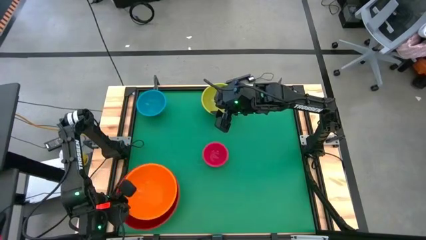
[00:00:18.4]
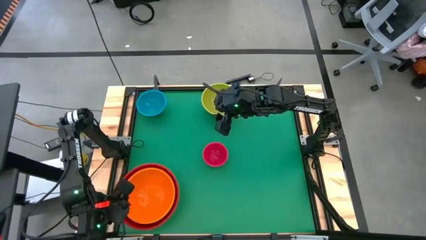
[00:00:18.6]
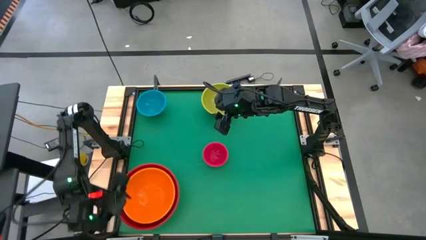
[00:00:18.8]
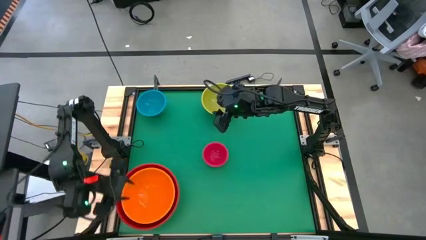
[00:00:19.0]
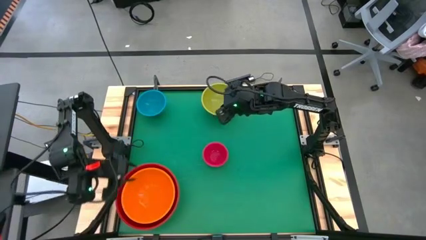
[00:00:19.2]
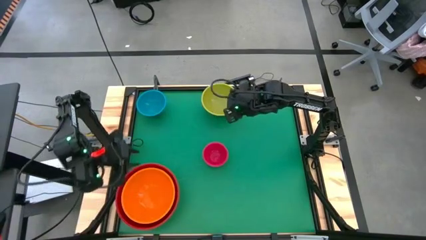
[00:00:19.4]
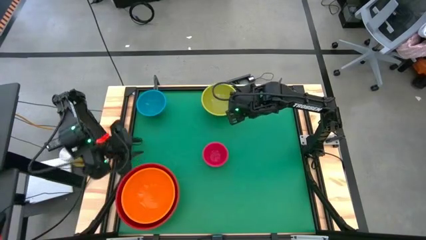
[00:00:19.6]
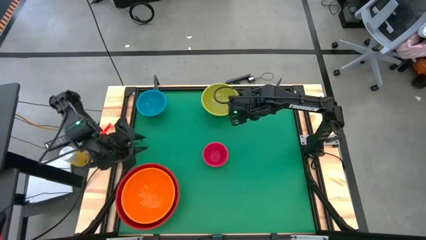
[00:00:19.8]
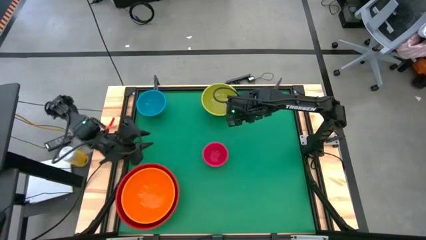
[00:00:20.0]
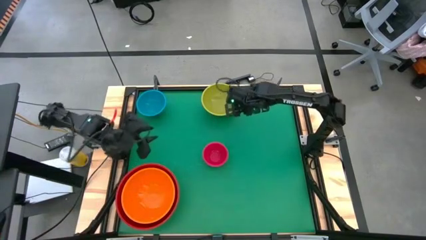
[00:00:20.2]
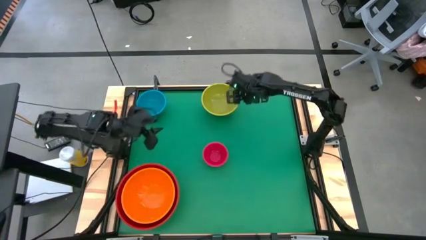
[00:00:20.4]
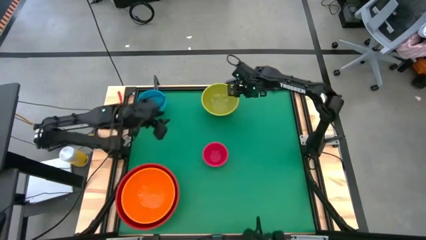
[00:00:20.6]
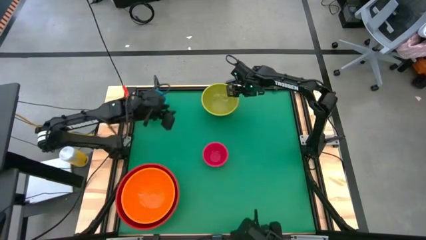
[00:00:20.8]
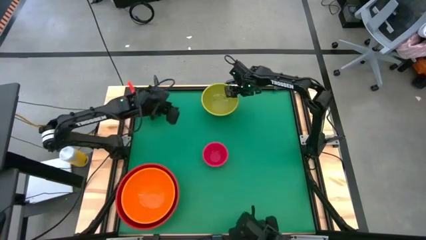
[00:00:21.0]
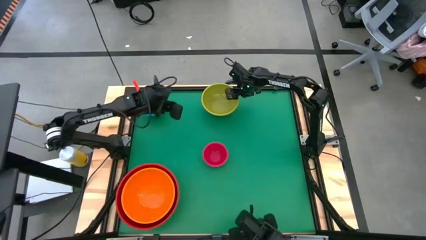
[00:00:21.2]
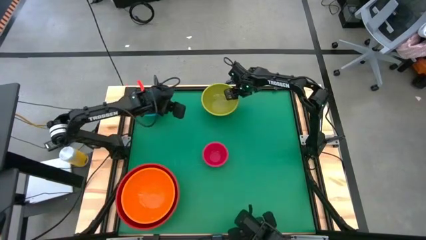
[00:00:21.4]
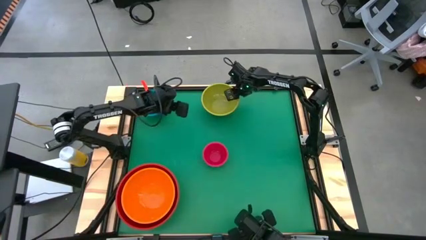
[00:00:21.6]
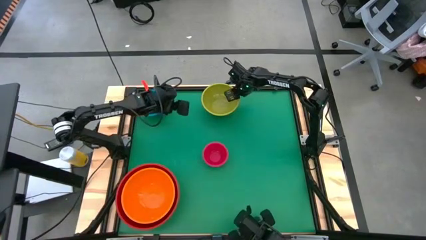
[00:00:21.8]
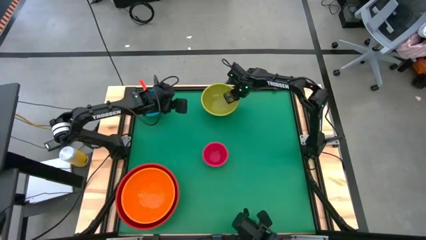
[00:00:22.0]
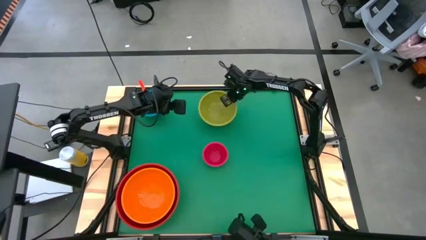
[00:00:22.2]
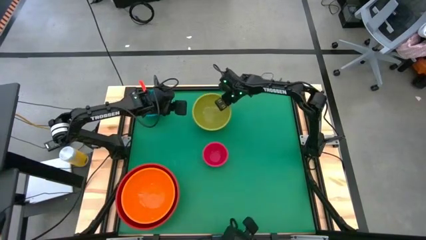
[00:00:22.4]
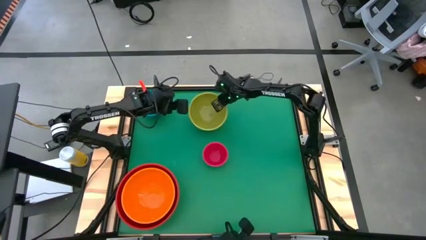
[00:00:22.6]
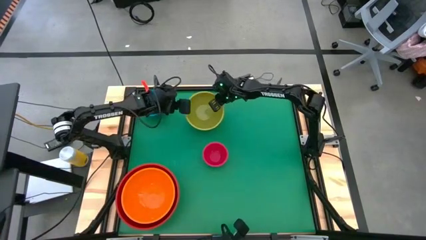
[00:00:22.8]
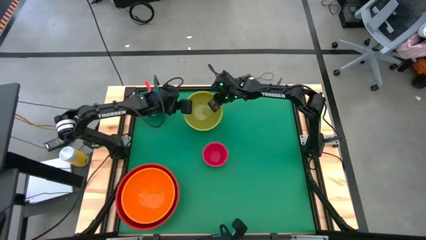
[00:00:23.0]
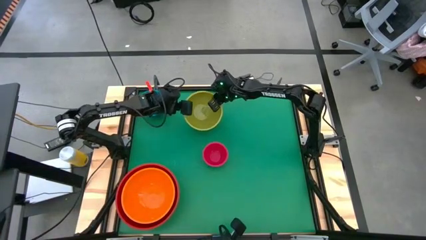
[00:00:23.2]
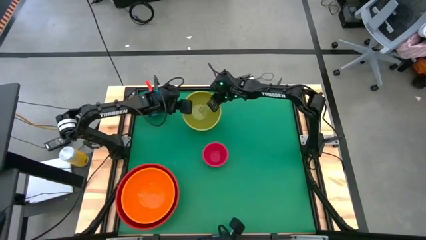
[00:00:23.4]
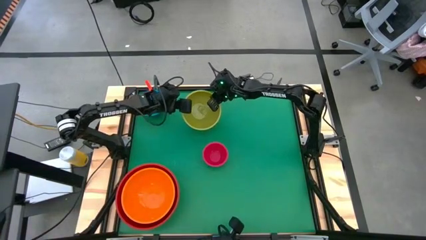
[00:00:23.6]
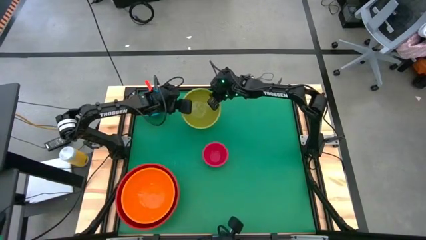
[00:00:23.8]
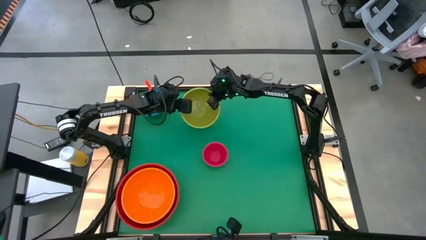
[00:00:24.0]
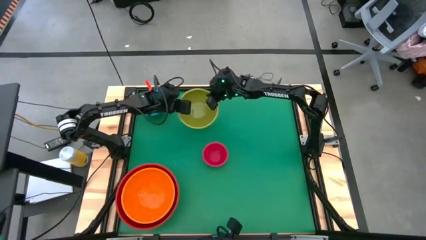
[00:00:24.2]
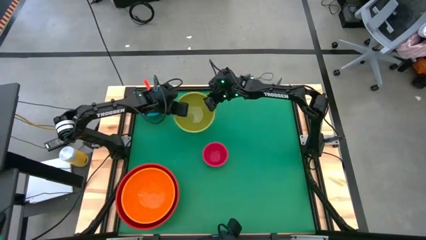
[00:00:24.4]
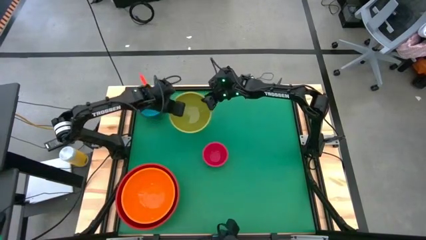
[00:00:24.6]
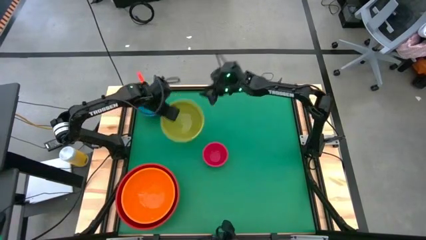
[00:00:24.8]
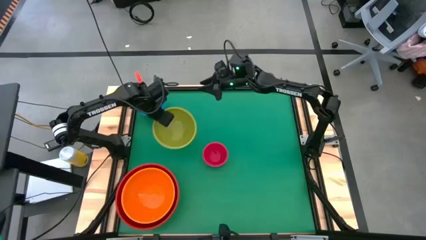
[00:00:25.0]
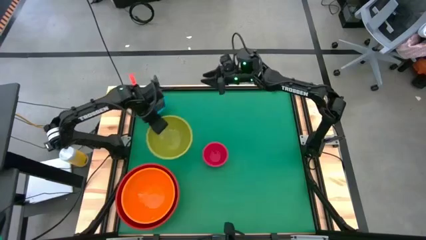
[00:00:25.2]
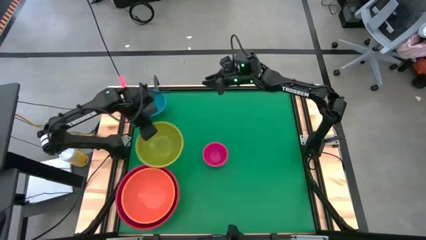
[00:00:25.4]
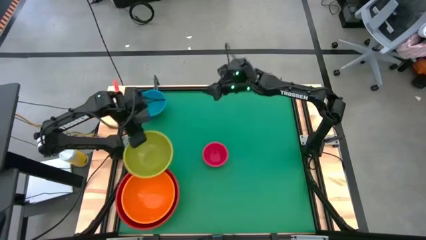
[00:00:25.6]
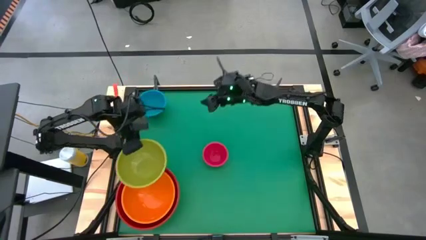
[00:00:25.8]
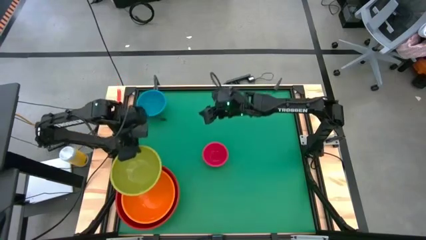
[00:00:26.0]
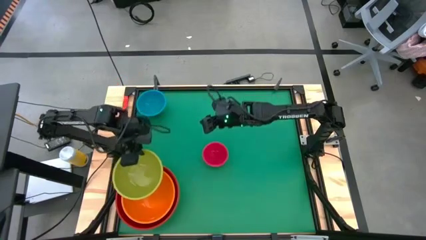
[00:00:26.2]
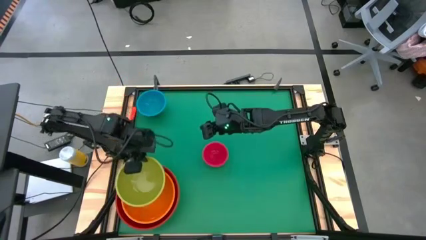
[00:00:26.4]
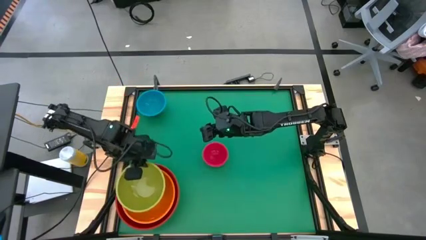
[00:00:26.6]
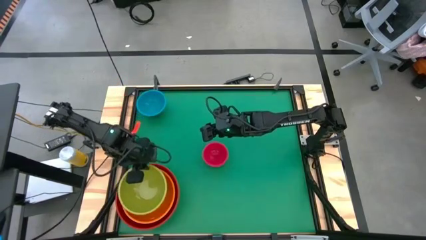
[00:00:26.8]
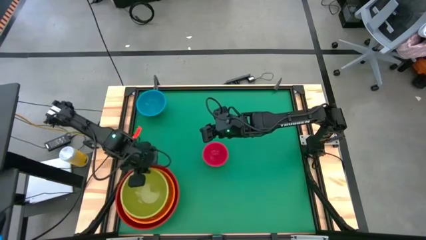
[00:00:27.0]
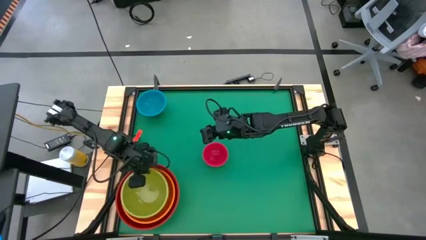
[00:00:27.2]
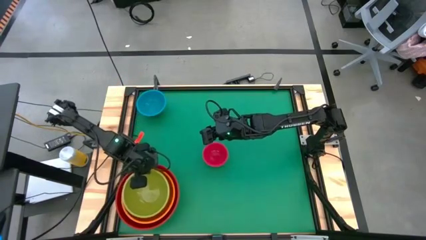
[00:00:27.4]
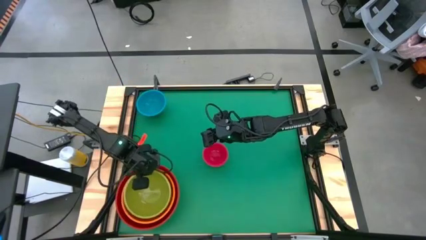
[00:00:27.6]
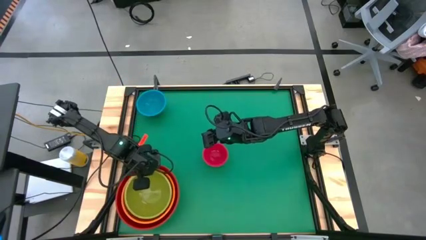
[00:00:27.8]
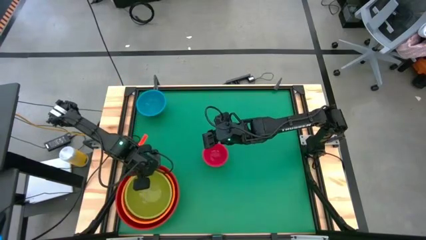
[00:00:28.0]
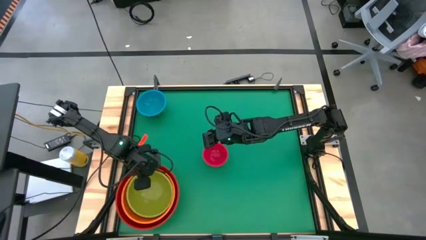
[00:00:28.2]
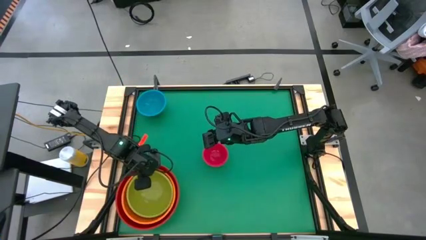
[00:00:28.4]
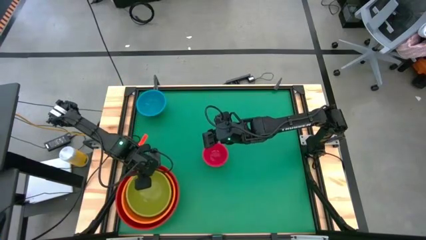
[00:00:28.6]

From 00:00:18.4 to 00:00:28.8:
Stack the green bowl into the top of the orange bowl
